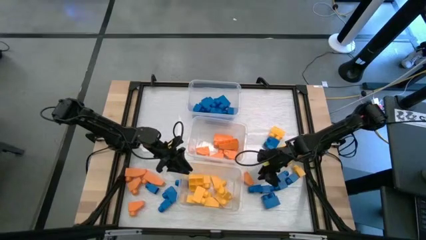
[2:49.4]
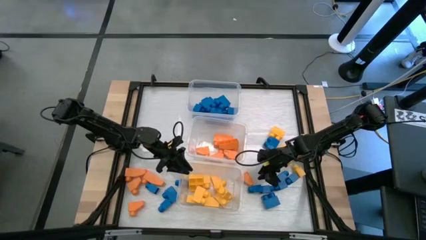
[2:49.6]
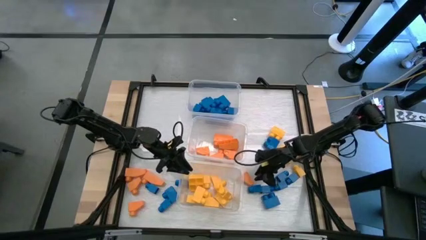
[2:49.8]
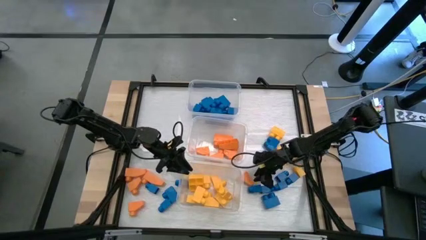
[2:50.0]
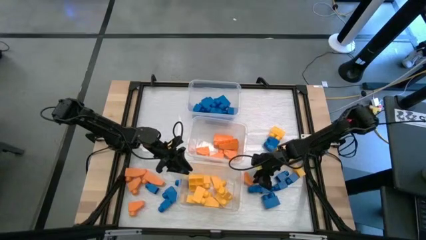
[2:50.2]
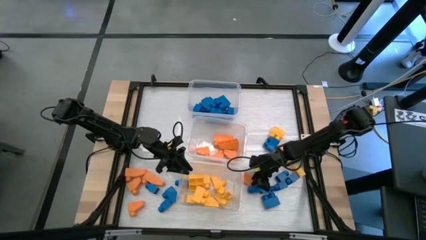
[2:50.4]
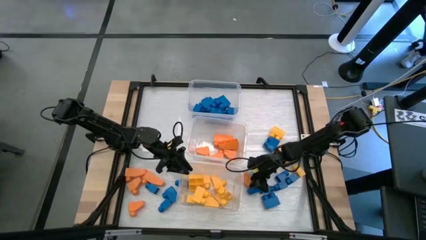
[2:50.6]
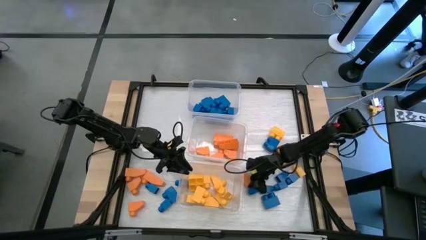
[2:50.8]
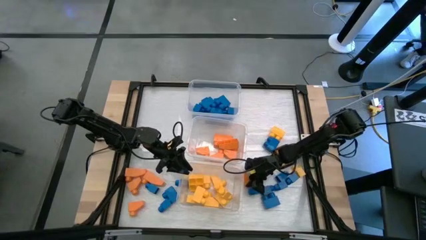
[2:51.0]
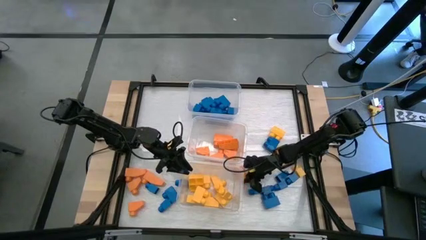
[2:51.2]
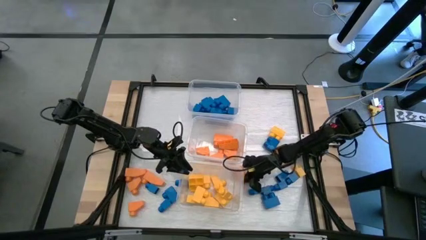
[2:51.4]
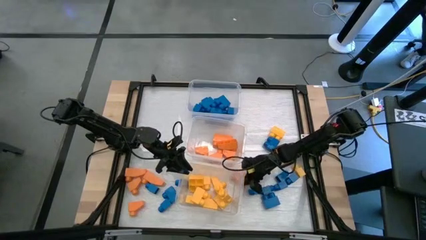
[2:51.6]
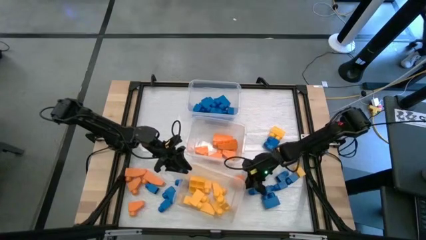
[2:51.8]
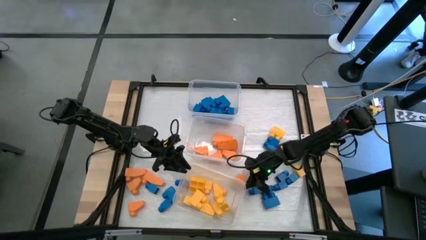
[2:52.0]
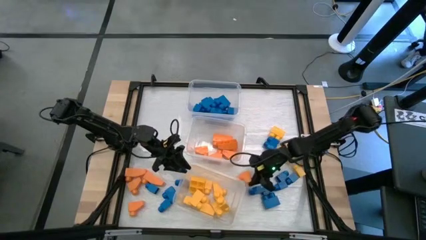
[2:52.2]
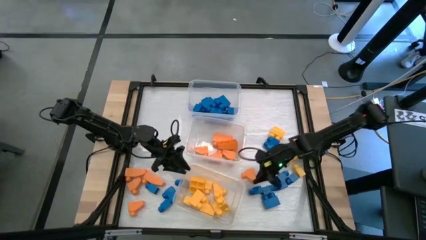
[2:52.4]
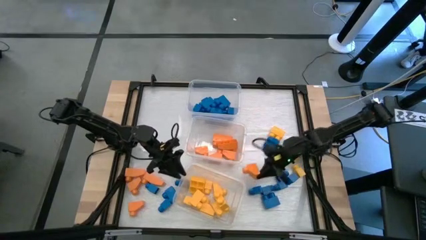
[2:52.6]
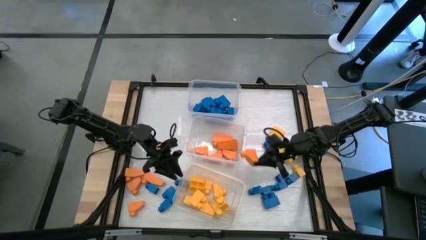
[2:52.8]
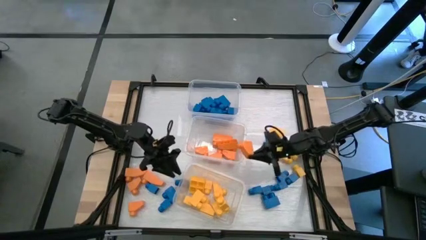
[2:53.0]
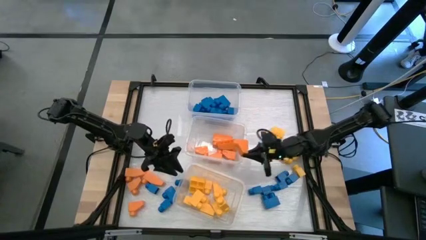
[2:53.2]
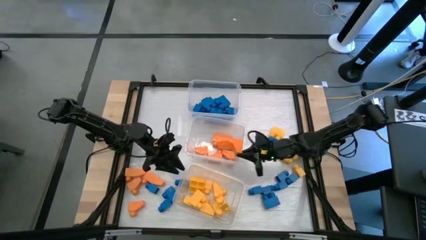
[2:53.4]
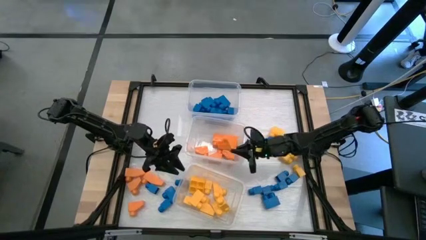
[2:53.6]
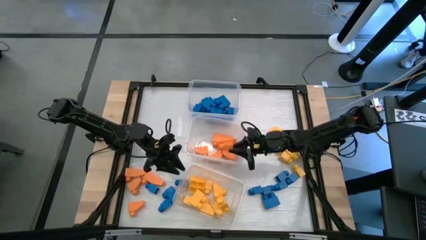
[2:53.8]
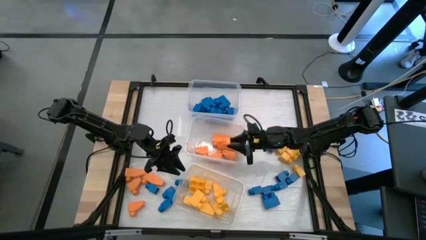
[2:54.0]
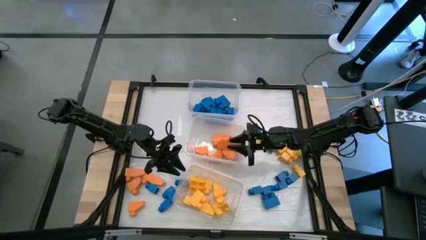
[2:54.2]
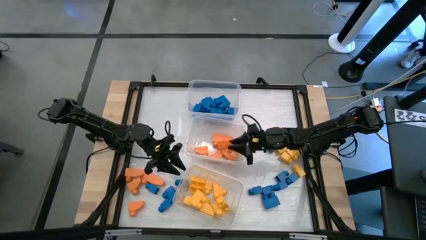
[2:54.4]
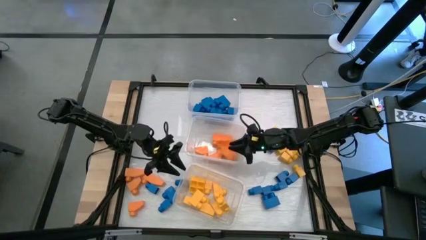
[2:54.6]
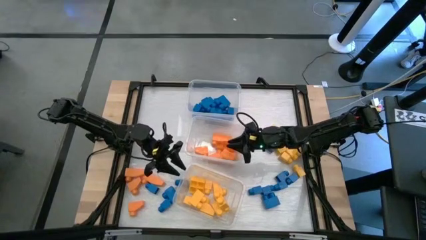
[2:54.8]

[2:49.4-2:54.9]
Task: Sort blocks
Put the orange game piece into the middle transparent bin

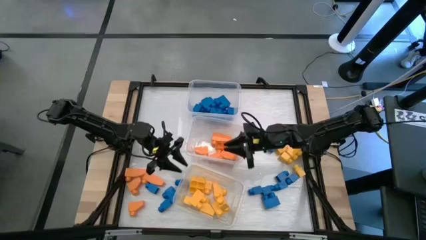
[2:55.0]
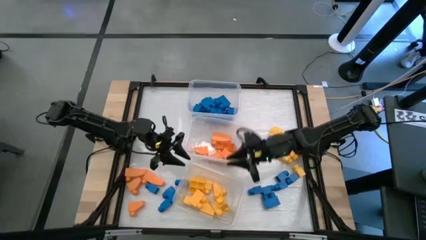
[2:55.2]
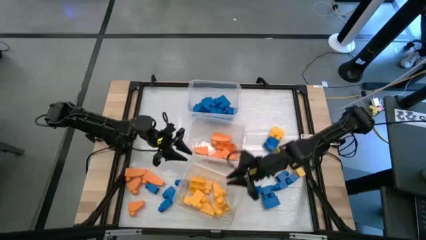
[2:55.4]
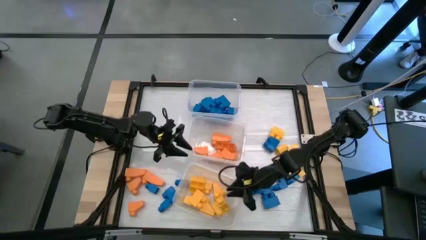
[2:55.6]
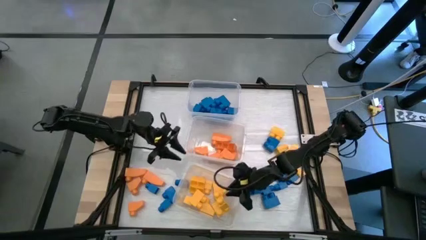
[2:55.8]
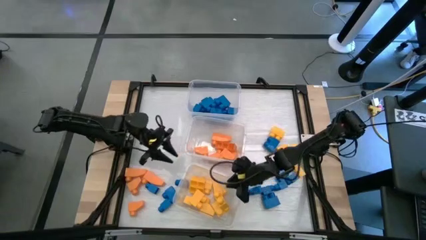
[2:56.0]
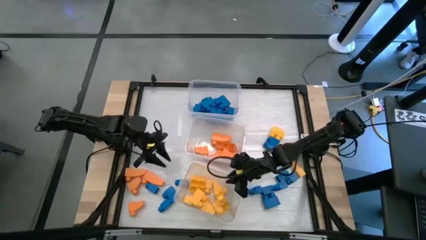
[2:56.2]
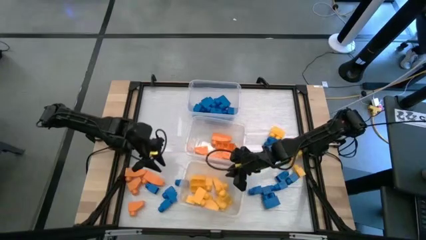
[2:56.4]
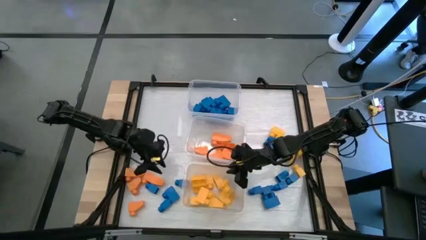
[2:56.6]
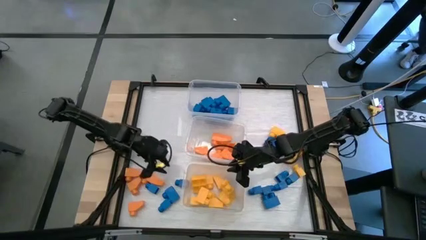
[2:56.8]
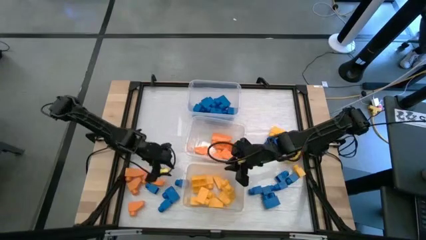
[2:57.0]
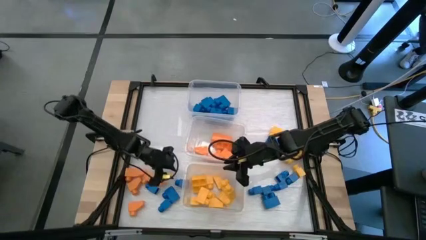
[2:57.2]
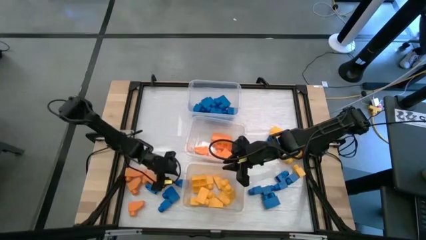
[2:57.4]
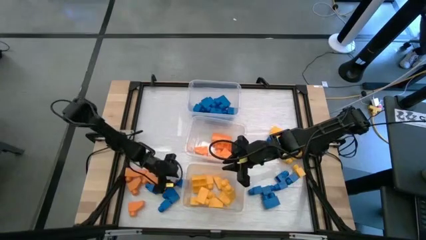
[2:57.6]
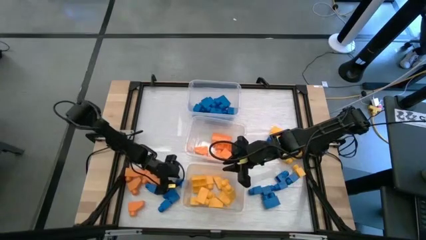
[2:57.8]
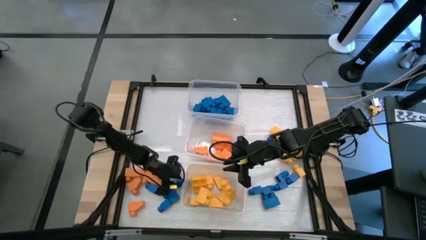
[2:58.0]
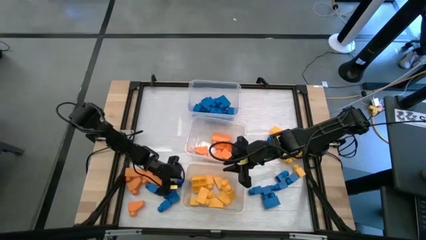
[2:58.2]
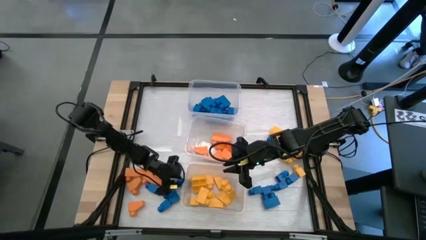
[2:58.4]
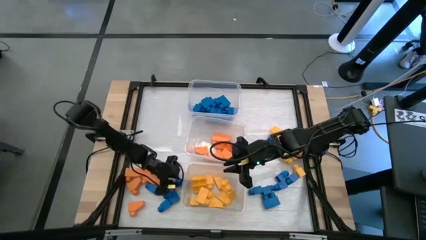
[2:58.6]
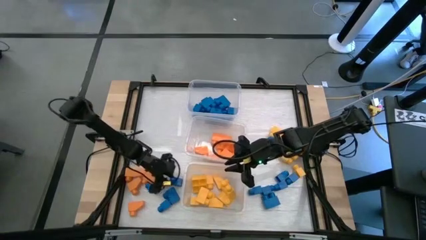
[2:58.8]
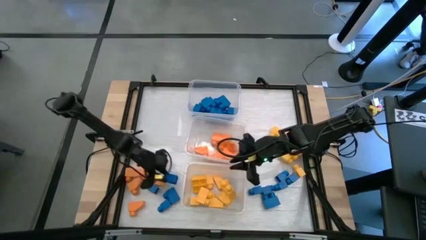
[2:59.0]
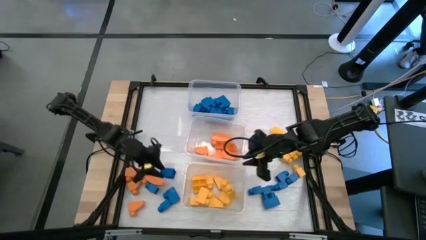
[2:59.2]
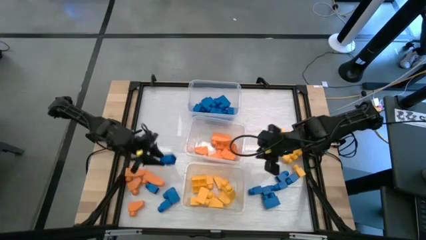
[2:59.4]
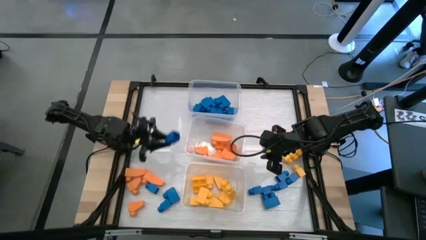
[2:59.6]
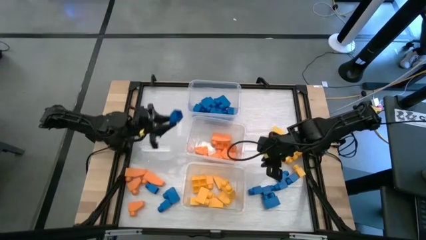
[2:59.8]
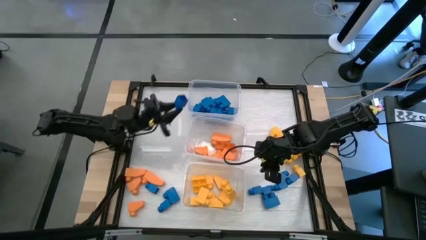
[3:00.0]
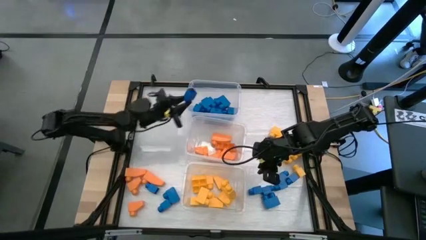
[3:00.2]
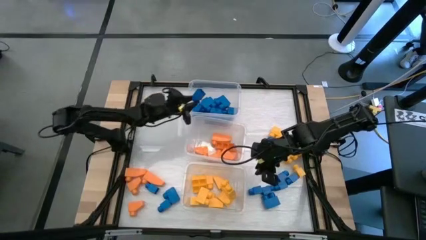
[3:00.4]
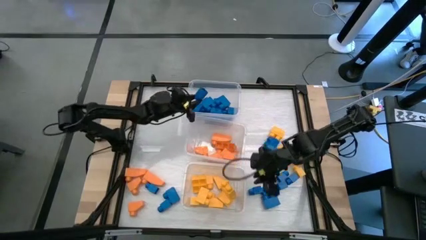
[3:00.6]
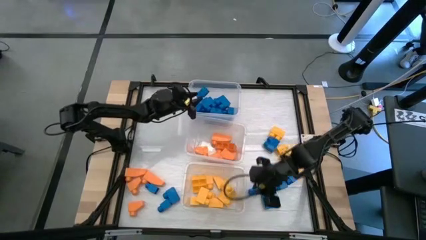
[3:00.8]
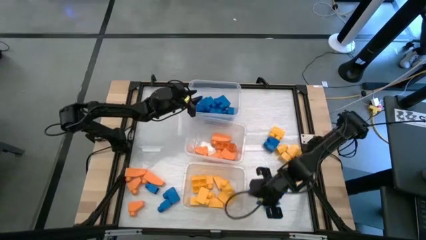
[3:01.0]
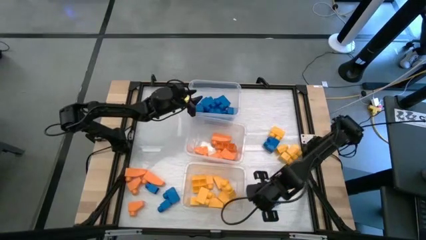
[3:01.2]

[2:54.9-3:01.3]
Put the blue game piece into the top transparent bin

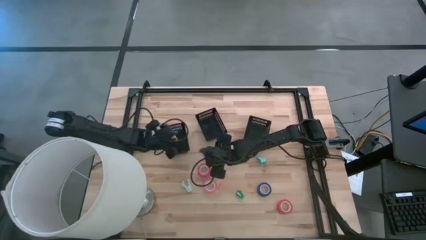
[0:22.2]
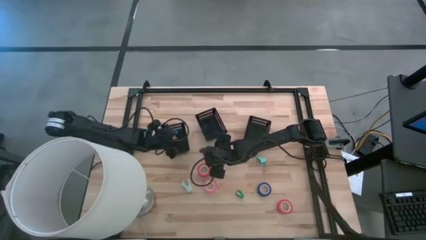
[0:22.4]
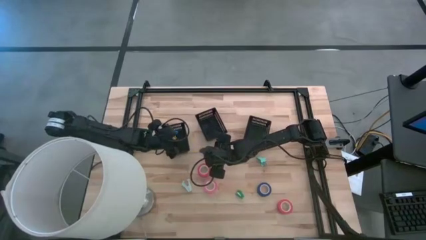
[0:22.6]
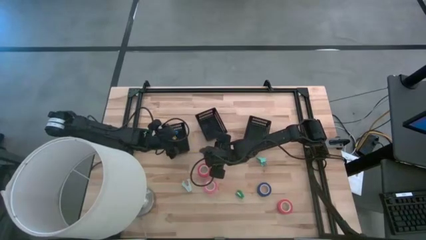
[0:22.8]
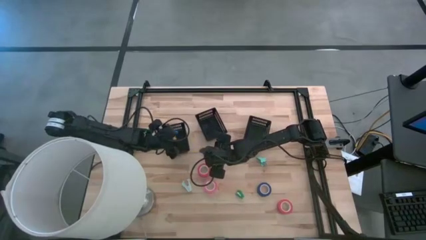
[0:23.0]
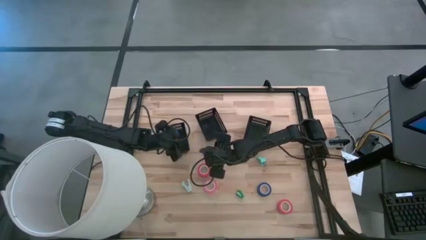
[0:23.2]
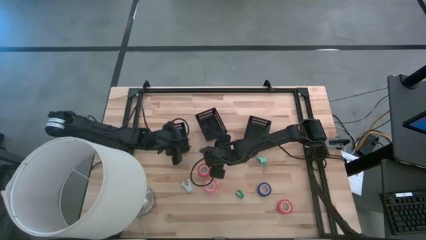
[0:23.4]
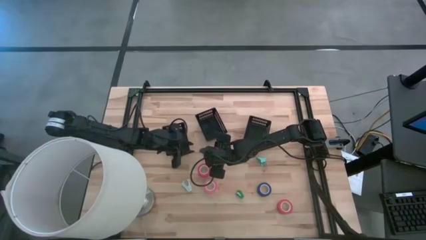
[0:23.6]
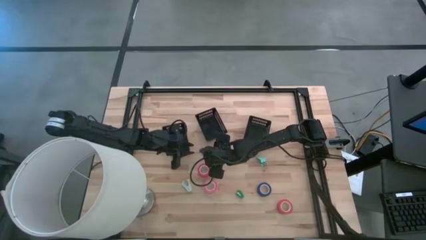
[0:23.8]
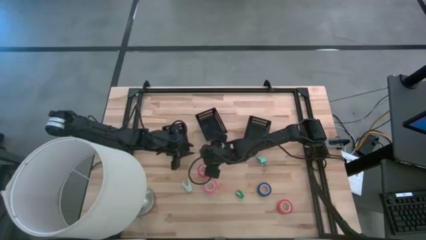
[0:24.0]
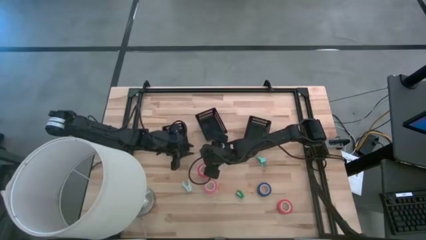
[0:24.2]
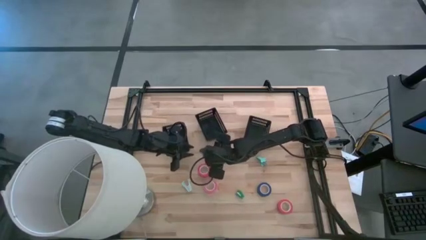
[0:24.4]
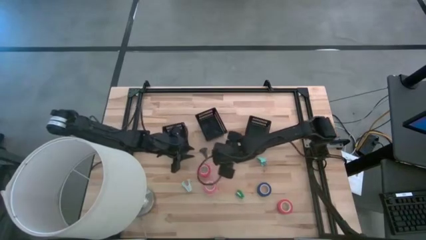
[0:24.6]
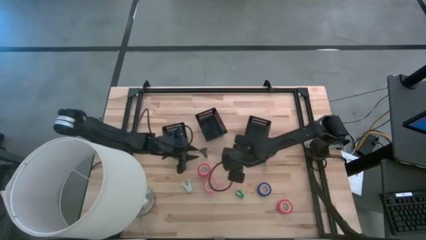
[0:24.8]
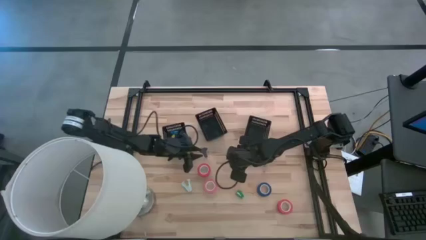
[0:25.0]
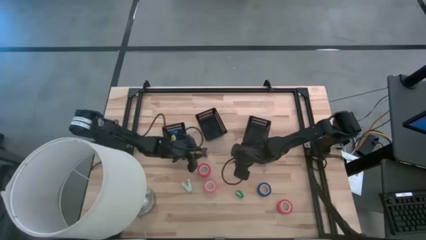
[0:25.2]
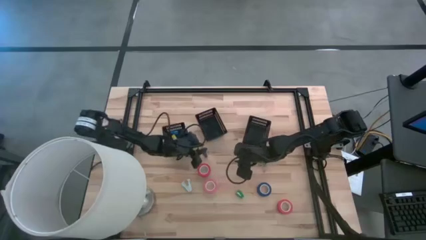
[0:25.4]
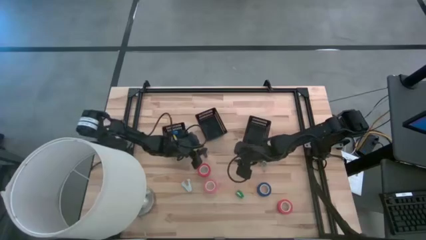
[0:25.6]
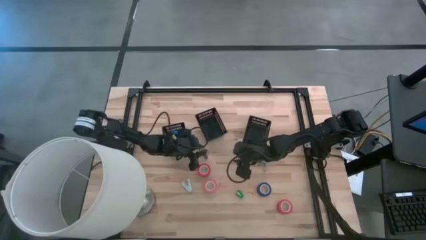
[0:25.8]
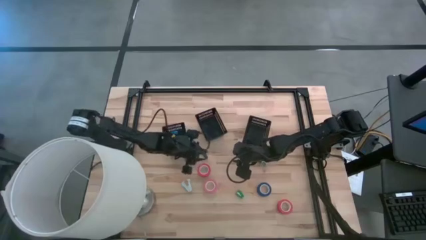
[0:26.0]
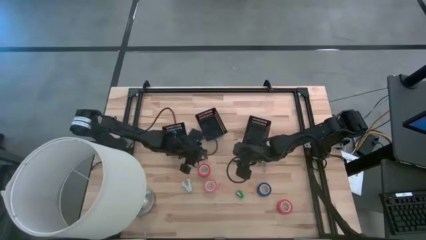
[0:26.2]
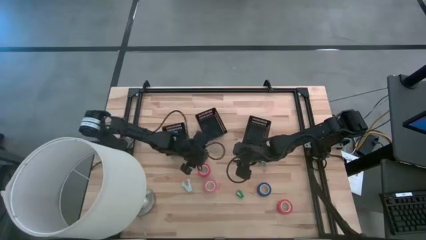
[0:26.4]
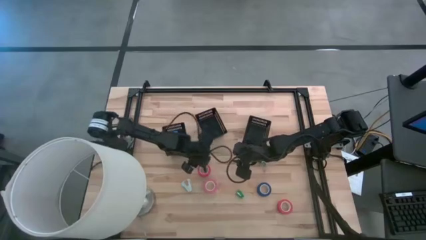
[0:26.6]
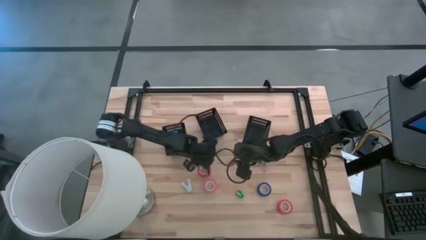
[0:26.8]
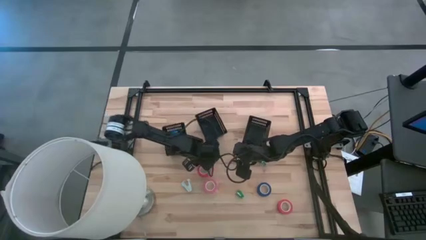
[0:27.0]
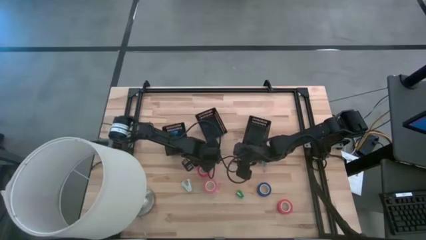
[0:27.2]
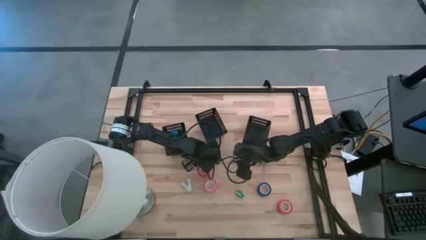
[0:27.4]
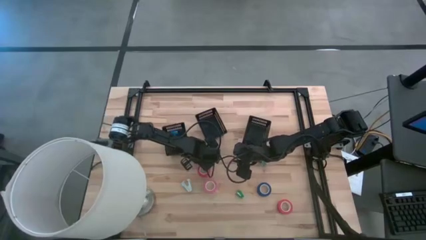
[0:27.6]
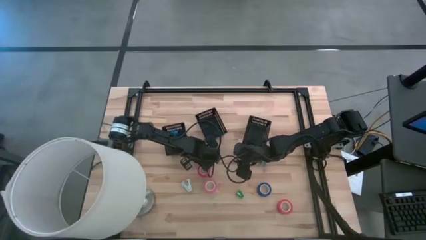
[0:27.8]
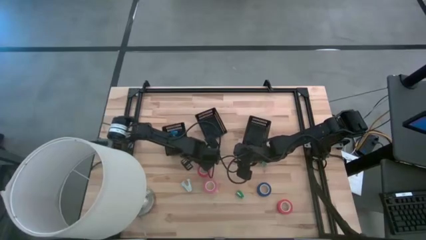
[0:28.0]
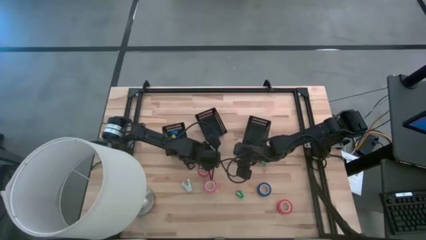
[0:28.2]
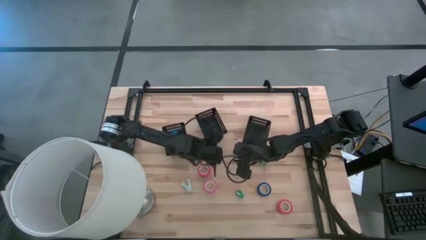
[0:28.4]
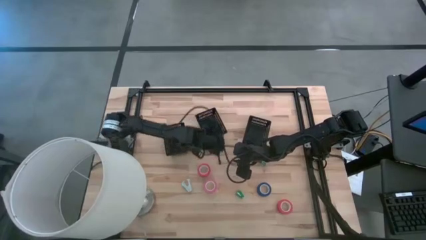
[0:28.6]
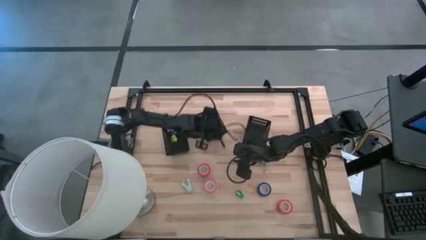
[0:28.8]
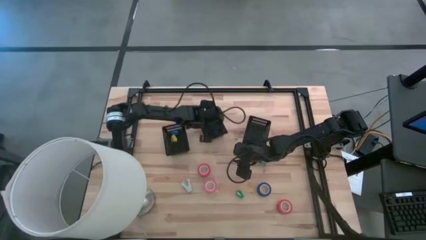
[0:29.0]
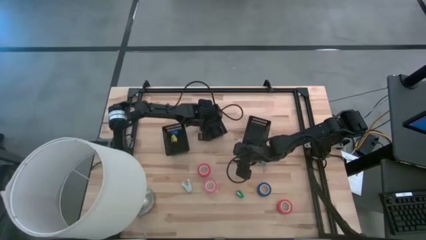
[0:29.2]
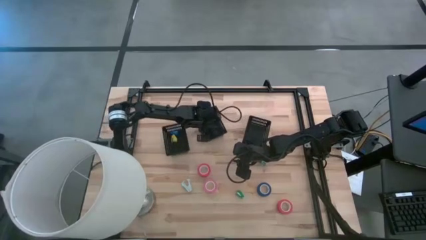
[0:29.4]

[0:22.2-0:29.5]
Task: Pick and place Stapler, Stapler remover, tape
Put the black staple remover into the center black bin
